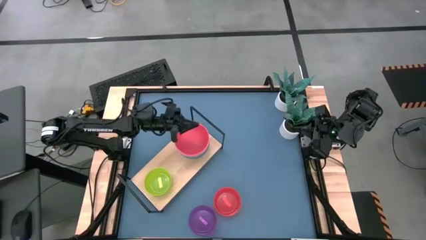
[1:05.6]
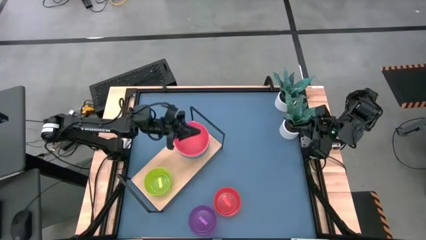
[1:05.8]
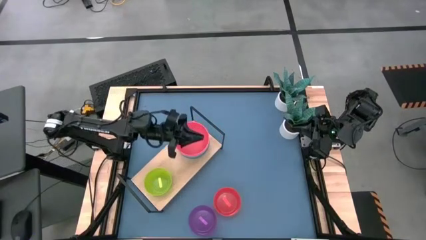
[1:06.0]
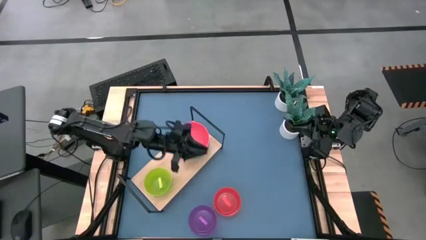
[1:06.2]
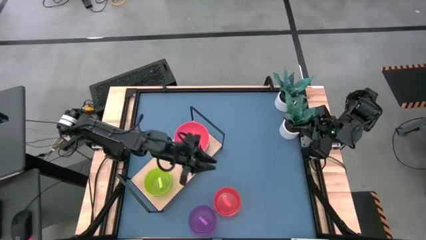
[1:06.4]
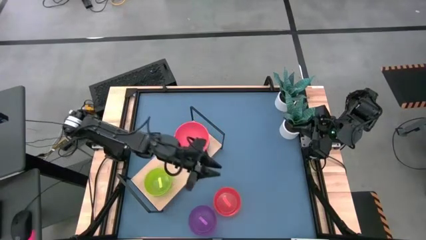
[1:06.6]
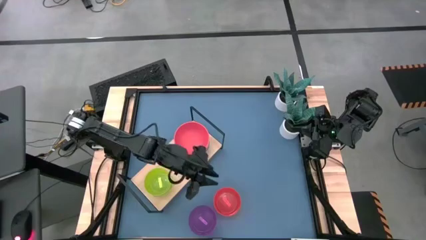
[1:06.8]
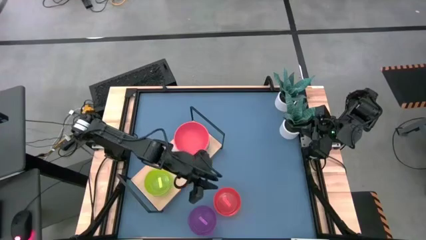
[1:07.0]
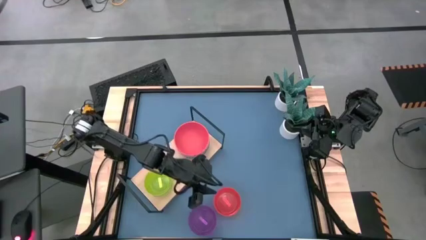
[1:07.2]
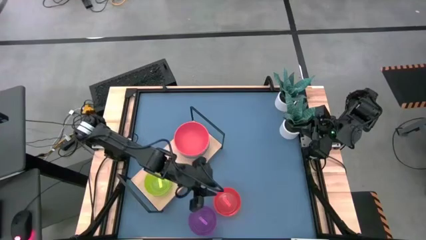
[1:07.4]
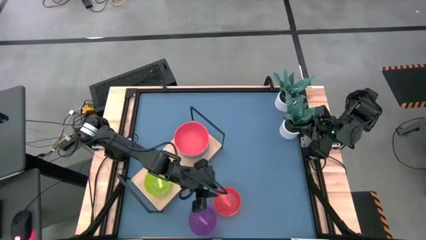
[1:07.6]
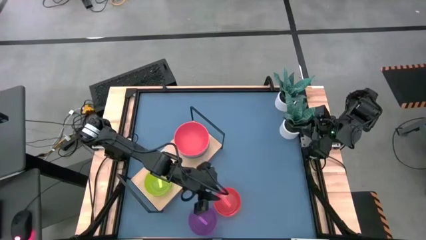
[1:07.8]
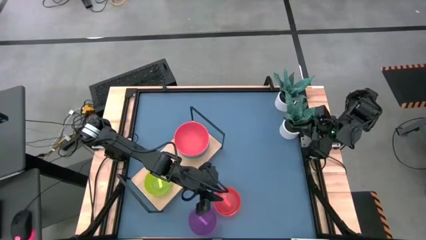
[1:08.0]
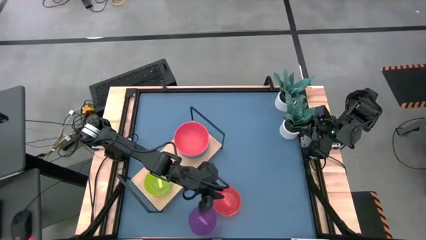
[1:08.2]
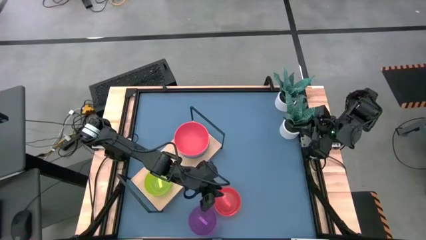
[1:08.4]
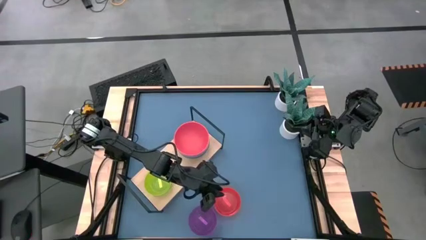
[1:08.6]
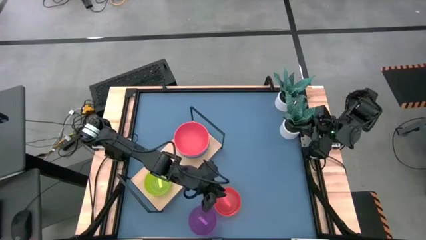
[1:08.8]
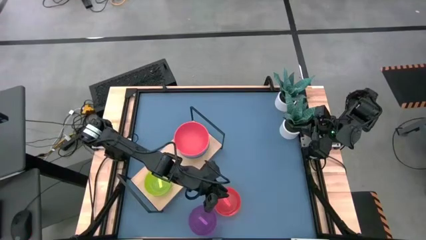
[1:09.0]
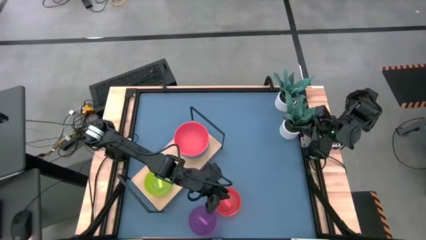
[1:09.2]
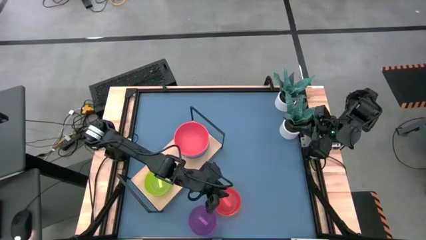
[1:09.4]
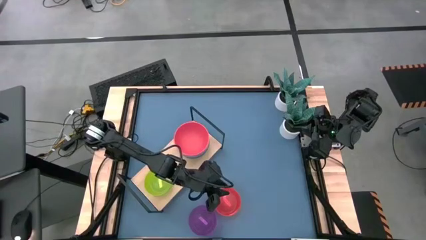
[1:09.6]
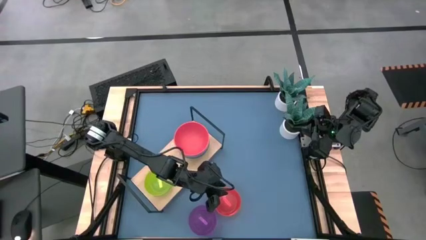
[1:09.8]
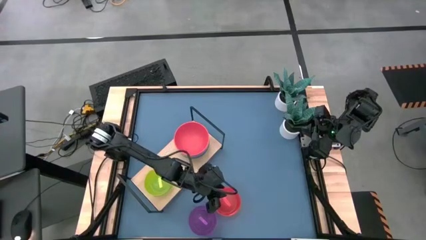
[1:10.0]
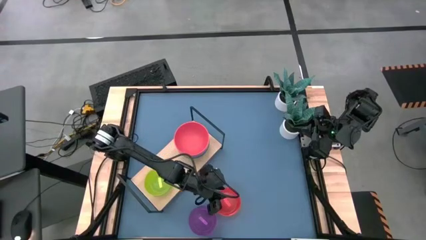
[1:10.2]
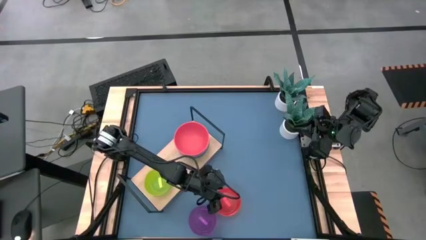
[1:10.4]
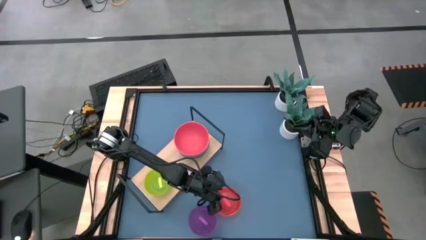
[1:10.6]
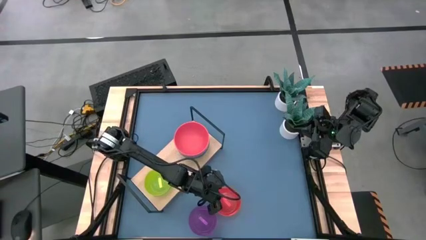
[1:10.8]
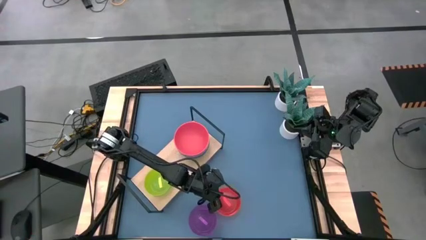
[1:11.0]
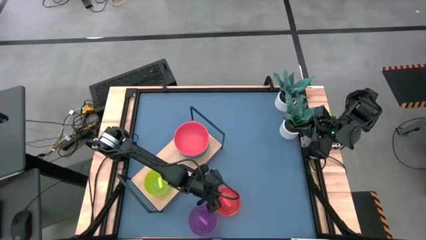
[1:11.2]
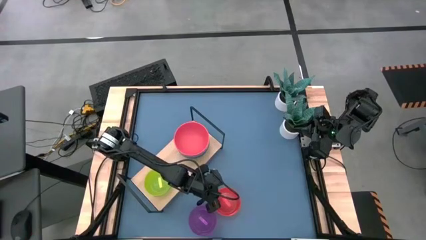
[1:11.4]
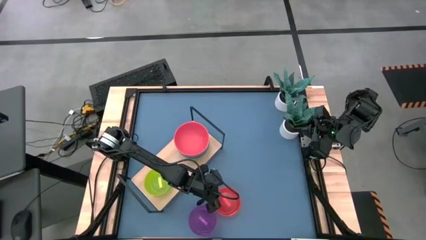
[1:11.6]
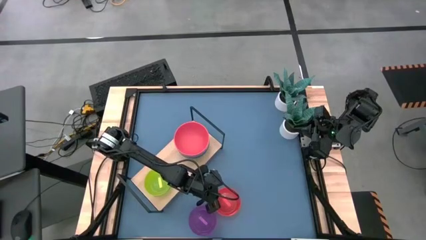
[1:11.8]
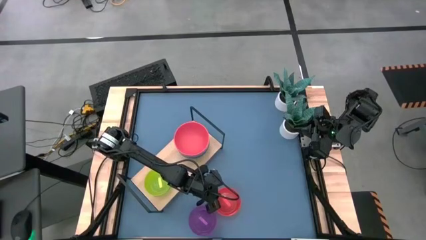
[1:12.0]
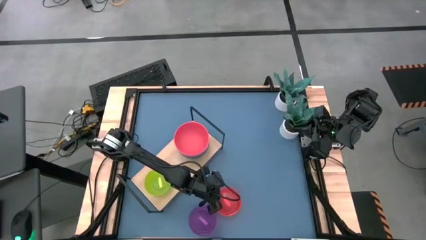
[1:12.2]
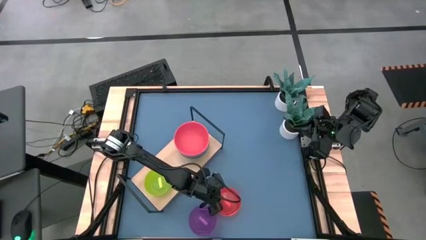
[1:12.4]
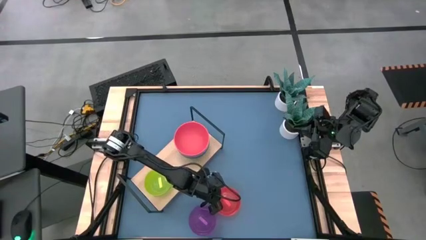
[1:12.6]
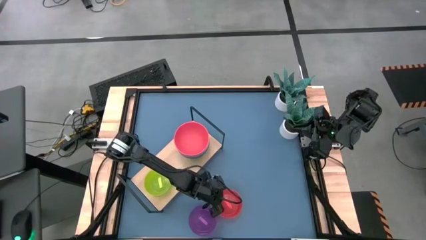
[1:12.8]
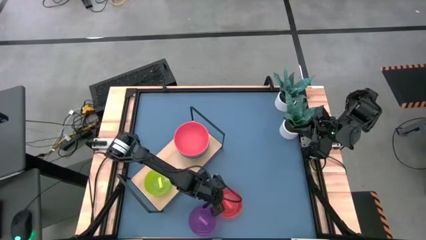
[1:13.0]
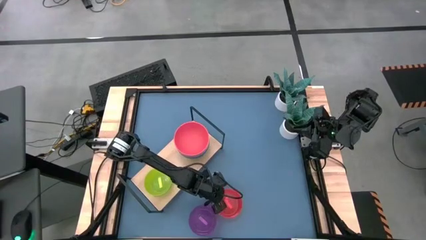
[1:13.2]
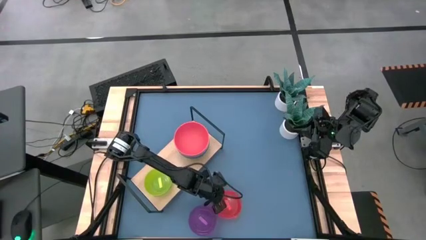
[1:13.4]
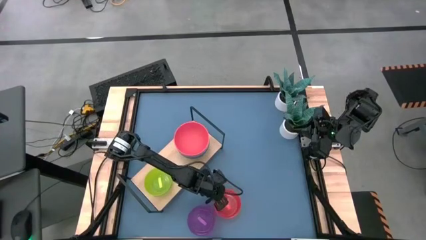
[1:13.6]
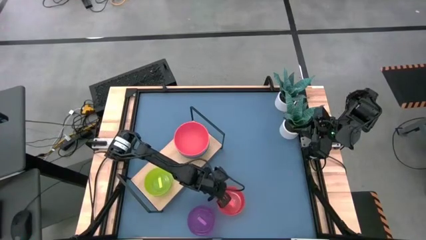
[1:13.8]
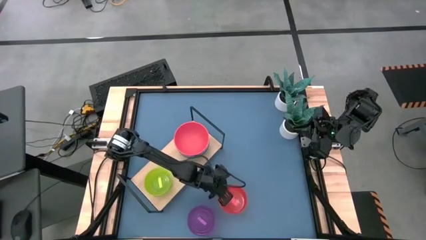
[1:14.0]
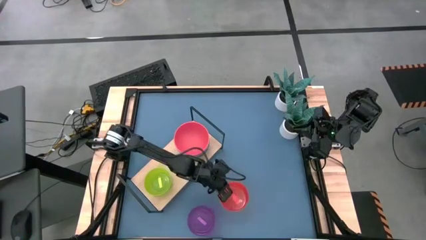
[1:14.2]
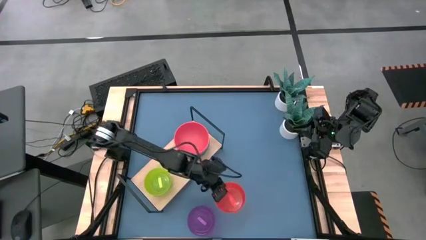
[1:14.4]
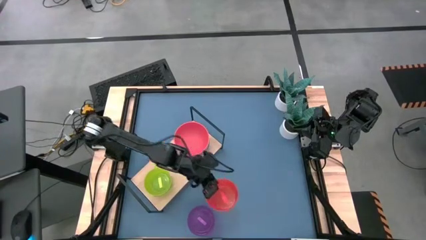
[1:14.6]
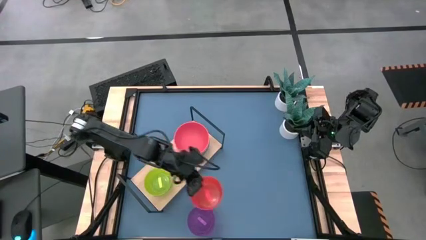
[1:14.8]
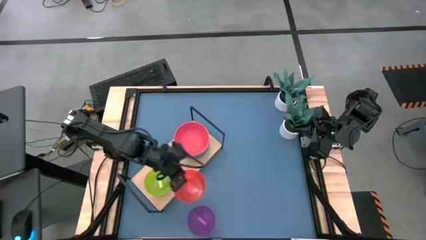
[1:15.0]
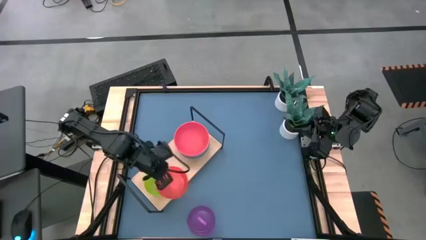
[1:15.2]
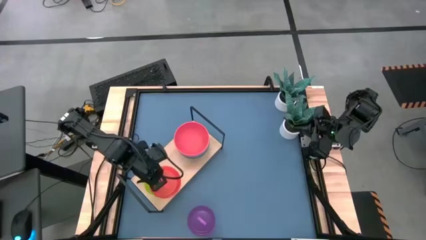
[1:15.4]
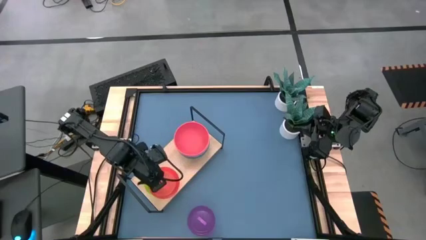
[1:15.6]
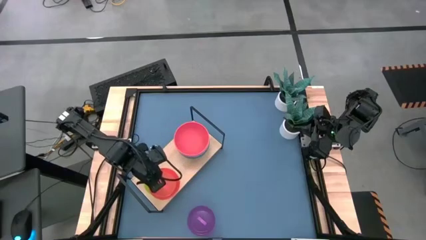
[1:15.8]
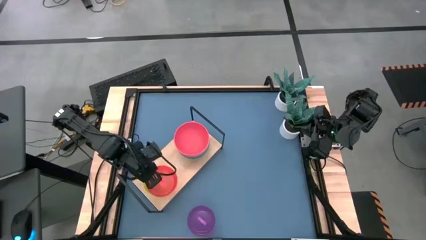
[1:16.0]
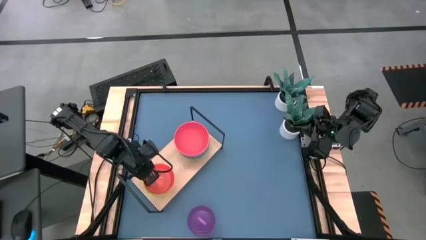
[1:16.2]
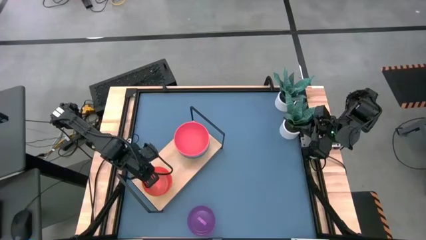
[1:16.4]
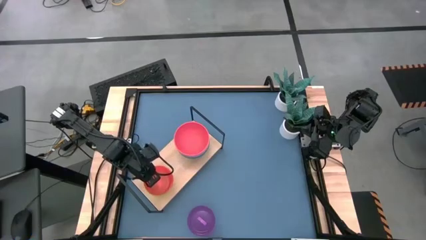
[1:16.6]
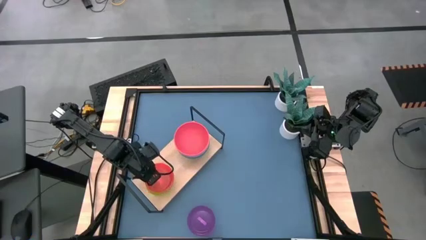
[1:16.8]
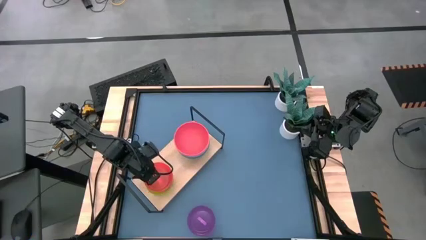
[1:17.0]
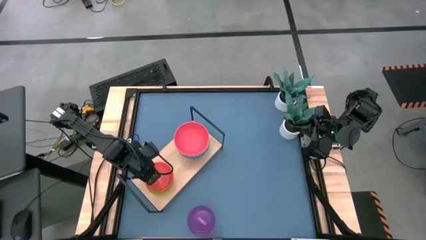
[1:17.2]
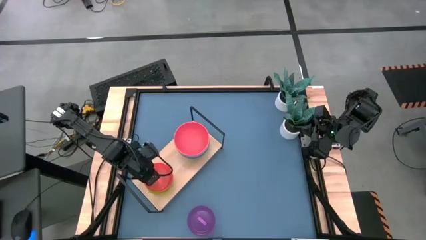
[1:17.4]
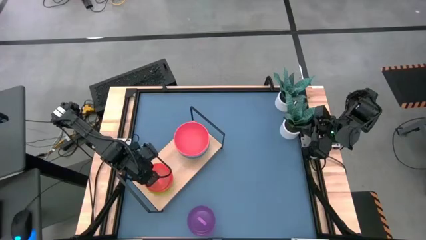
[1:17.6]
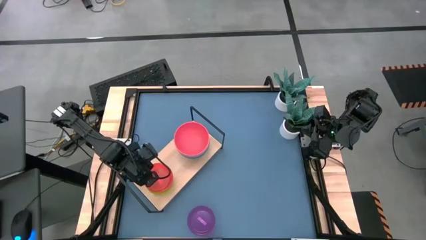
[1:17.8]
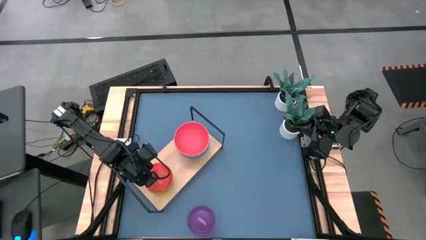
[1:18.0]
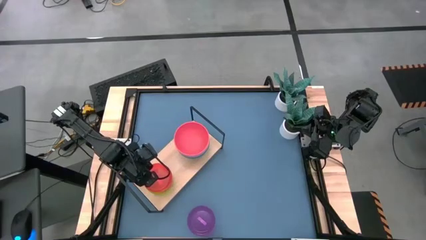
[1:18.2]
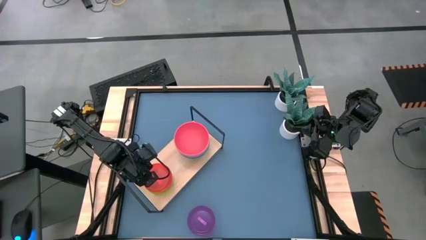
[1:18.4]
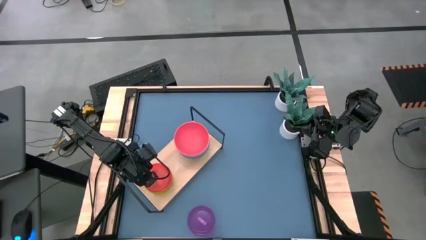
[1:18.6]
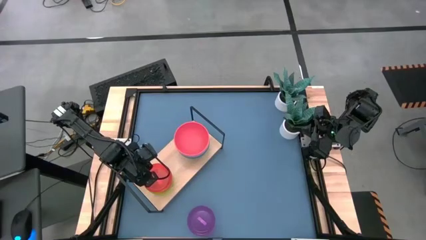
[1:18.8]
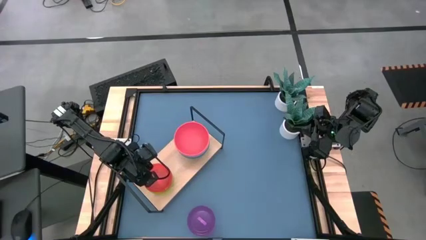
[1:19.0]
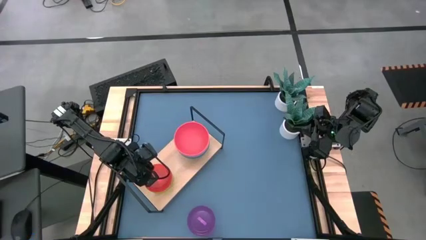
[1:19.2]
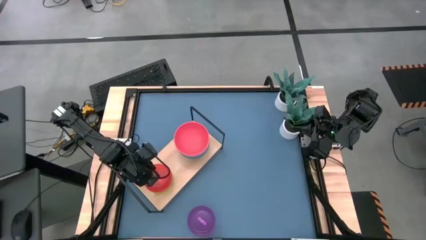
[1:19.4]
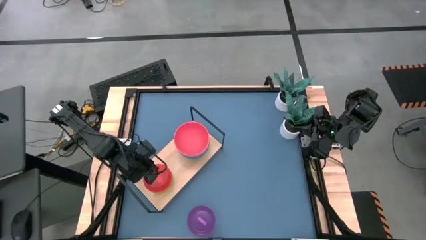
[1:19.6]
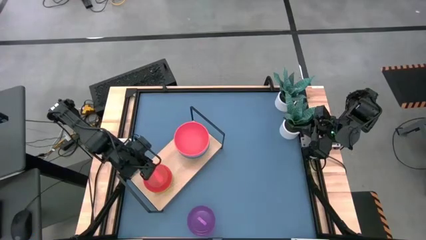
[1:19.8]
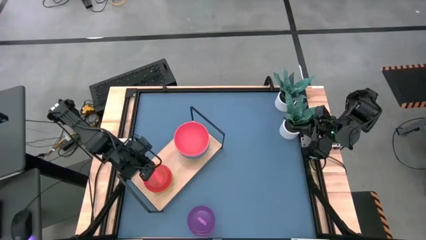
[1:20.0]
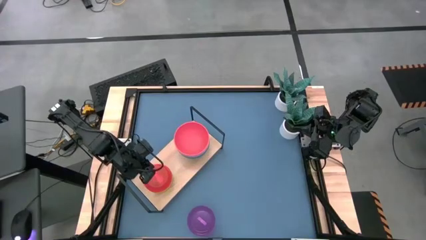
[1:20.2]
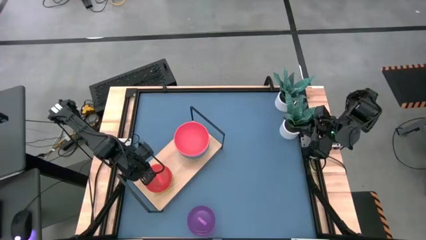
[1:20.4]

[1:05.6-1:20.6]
Task: Place and stack bowls onto a shelf
Stack the small orange bowl on top of the yellow bowl on the shelf
